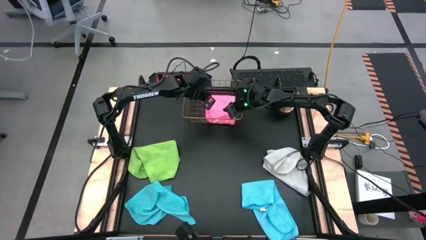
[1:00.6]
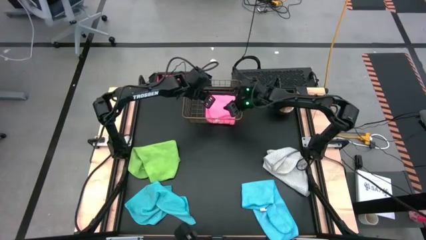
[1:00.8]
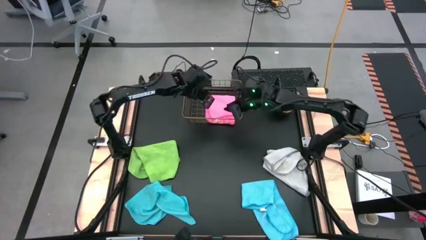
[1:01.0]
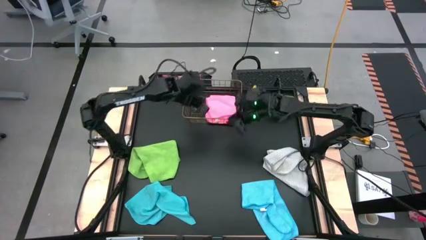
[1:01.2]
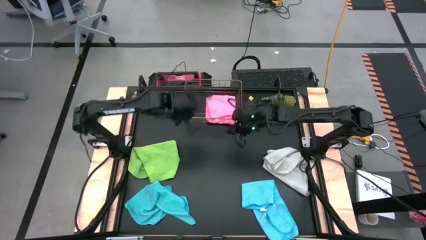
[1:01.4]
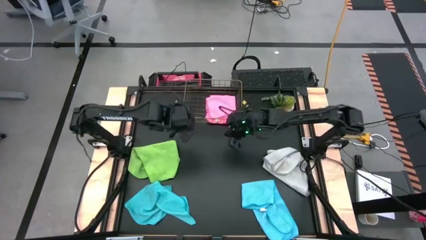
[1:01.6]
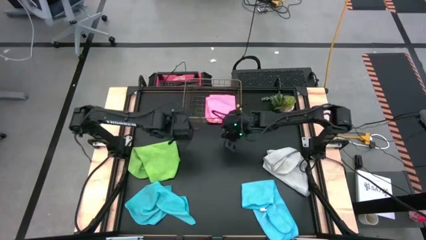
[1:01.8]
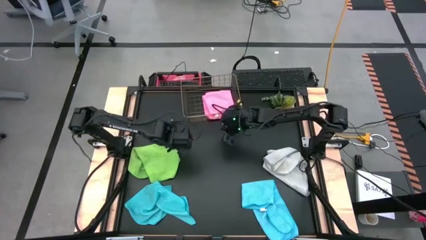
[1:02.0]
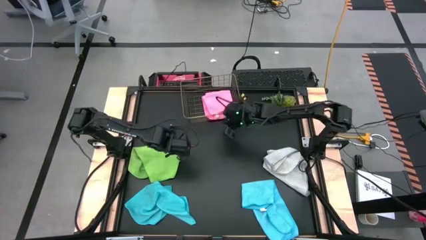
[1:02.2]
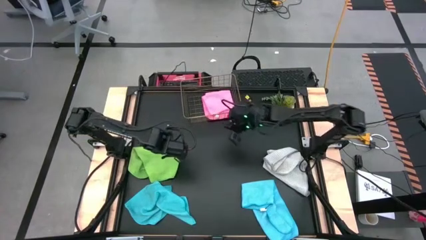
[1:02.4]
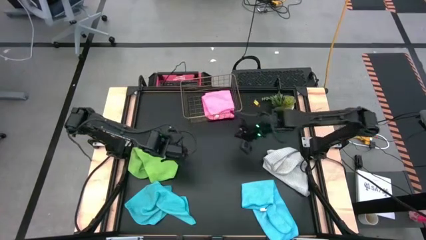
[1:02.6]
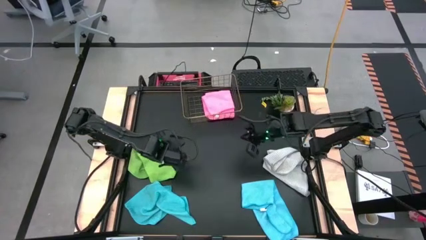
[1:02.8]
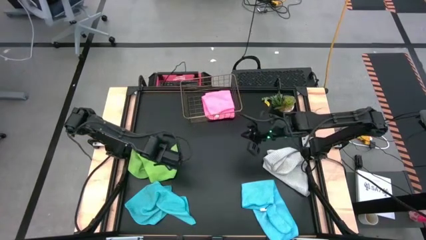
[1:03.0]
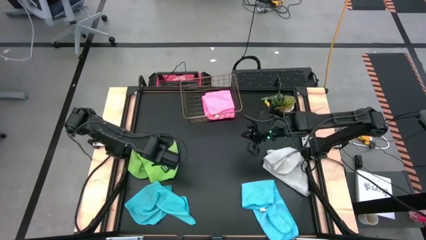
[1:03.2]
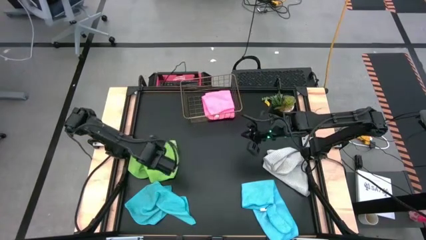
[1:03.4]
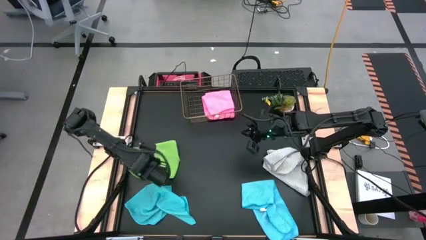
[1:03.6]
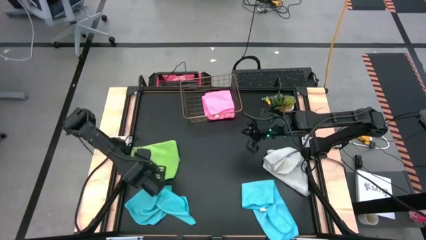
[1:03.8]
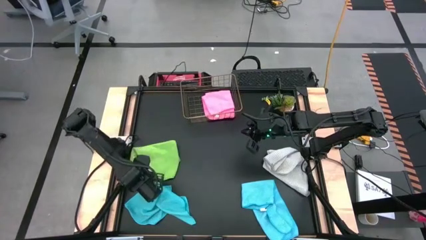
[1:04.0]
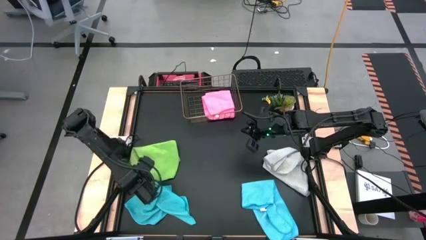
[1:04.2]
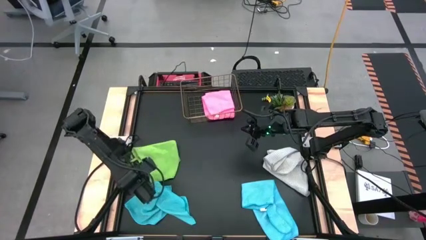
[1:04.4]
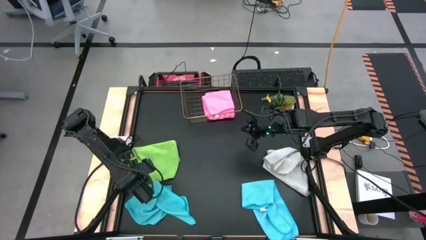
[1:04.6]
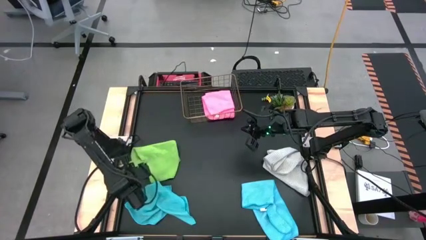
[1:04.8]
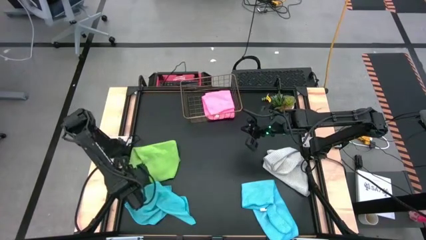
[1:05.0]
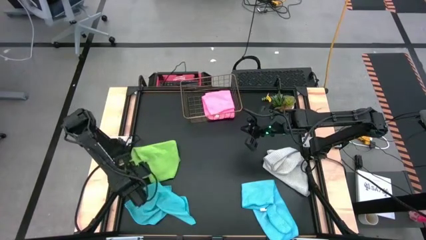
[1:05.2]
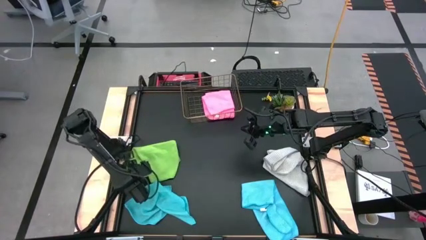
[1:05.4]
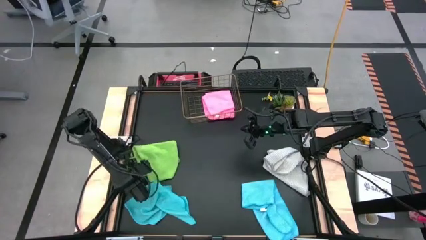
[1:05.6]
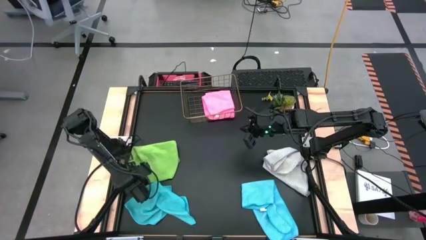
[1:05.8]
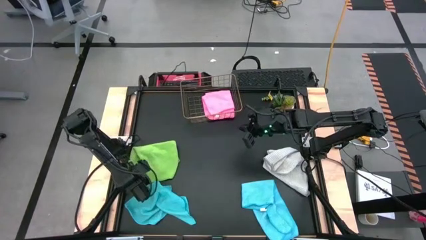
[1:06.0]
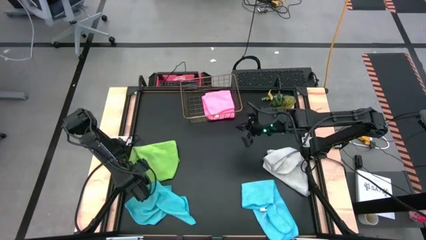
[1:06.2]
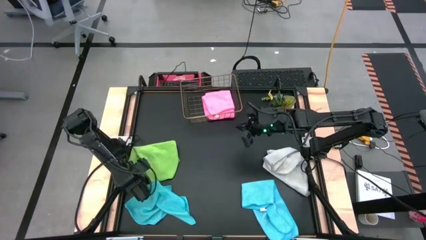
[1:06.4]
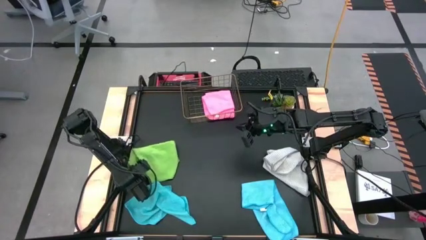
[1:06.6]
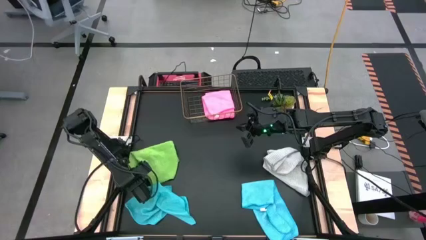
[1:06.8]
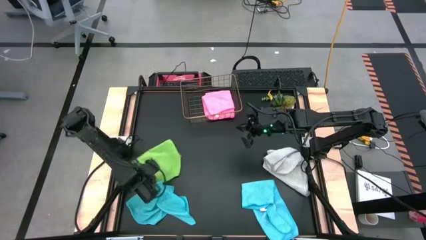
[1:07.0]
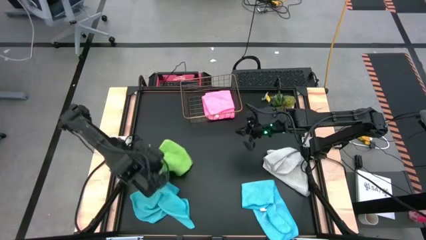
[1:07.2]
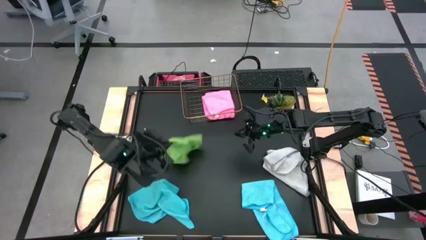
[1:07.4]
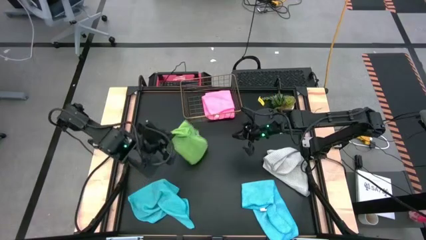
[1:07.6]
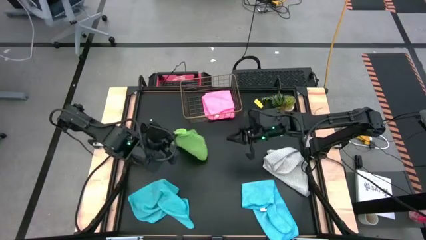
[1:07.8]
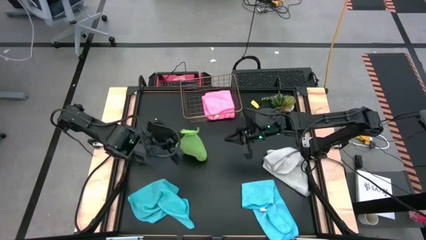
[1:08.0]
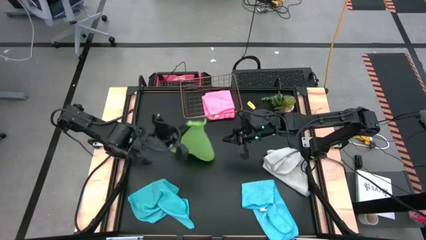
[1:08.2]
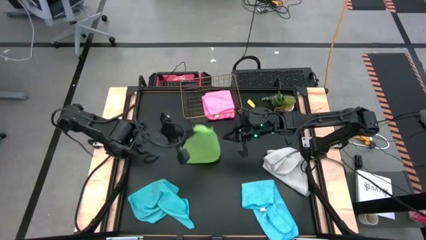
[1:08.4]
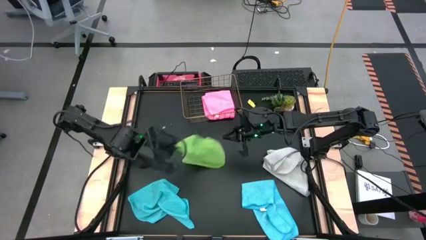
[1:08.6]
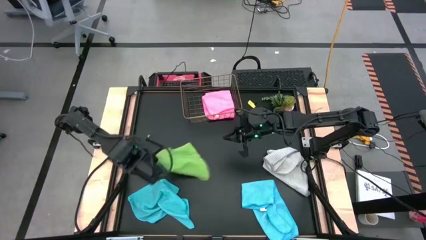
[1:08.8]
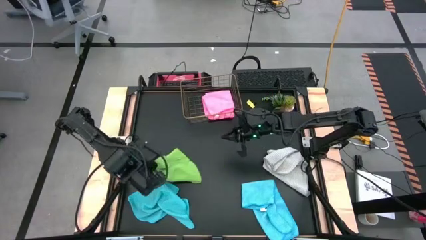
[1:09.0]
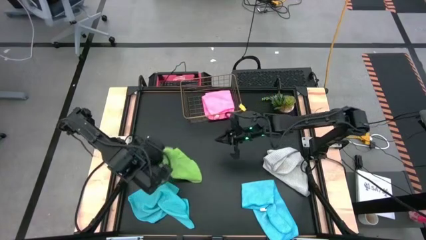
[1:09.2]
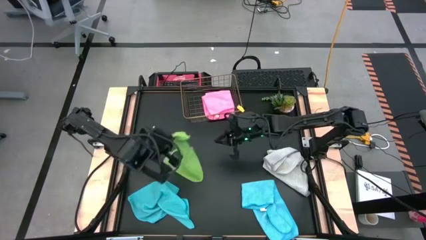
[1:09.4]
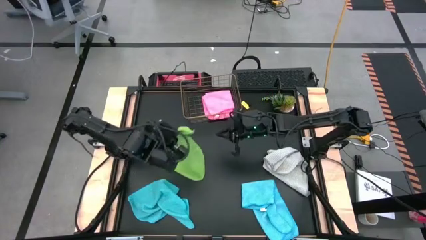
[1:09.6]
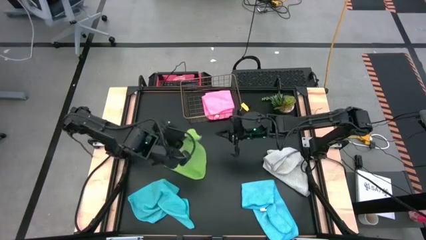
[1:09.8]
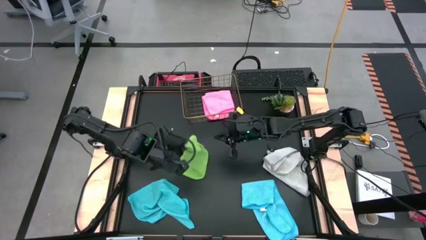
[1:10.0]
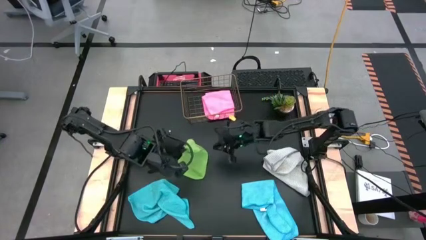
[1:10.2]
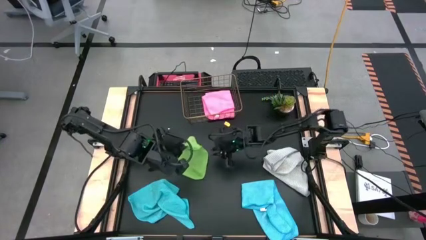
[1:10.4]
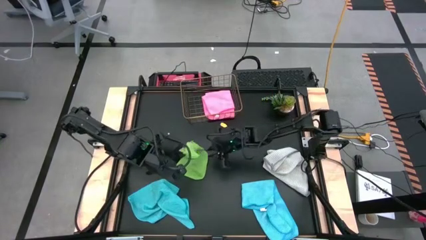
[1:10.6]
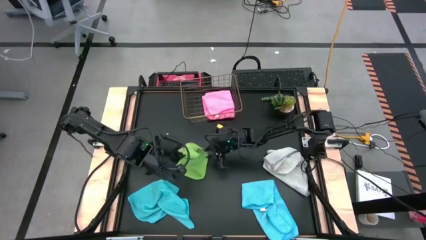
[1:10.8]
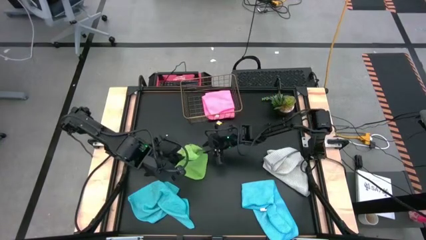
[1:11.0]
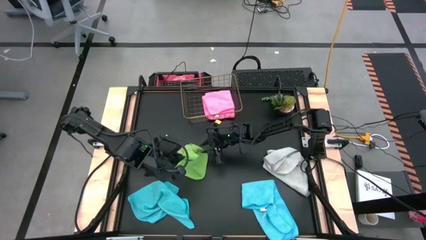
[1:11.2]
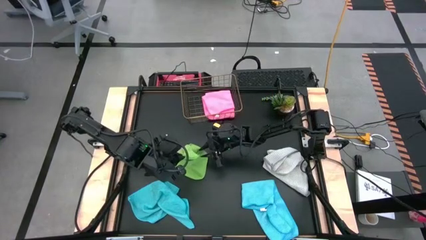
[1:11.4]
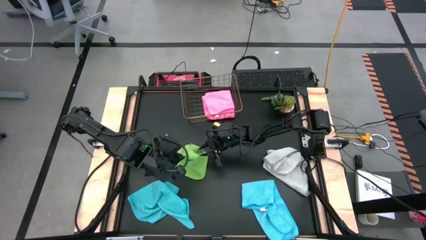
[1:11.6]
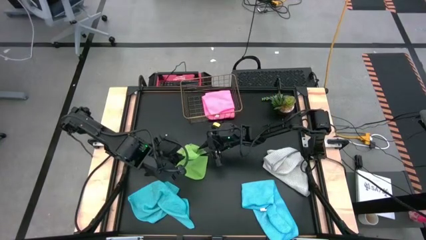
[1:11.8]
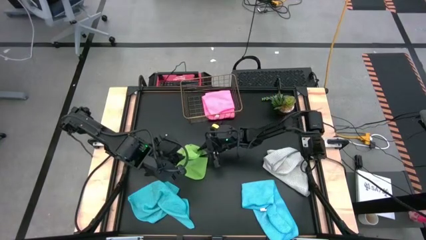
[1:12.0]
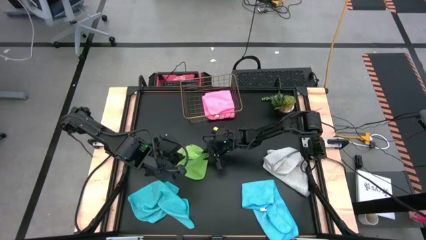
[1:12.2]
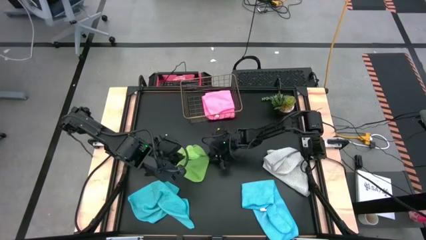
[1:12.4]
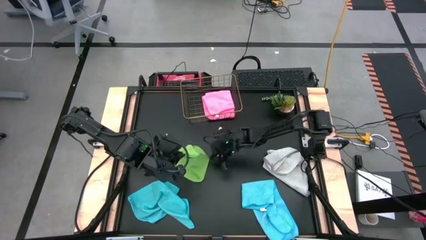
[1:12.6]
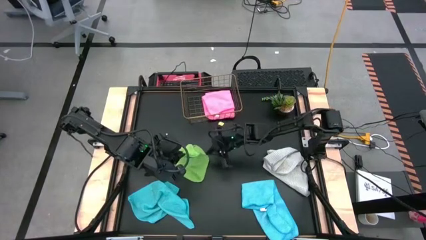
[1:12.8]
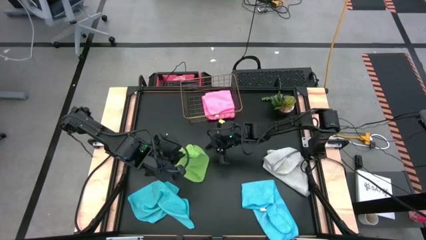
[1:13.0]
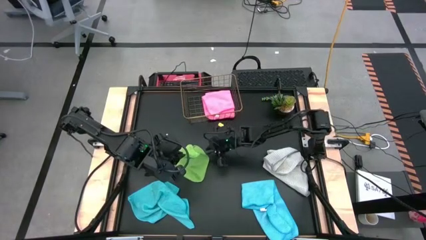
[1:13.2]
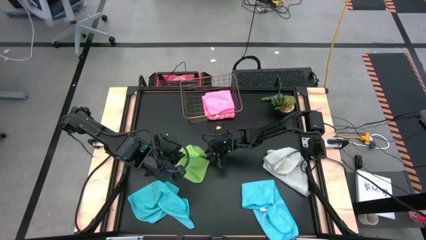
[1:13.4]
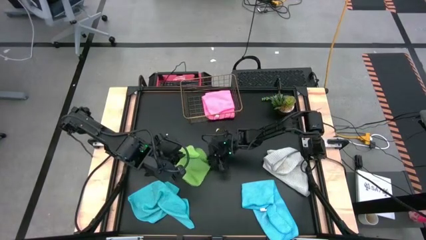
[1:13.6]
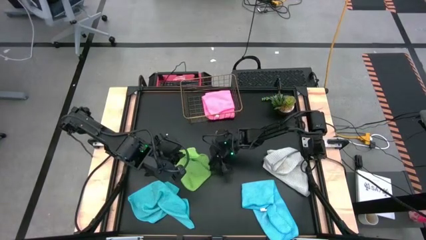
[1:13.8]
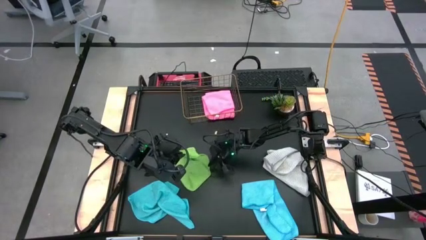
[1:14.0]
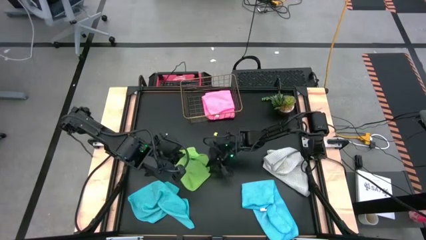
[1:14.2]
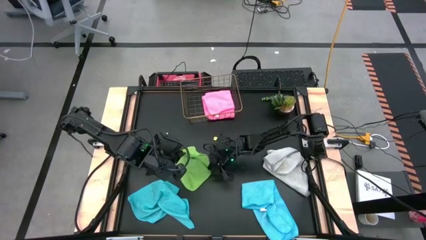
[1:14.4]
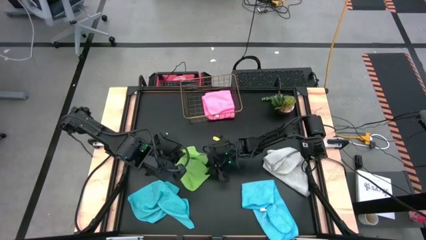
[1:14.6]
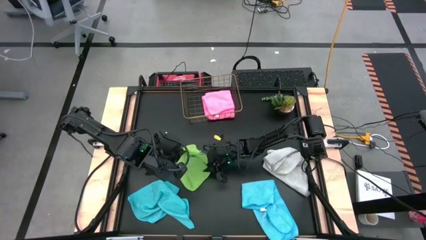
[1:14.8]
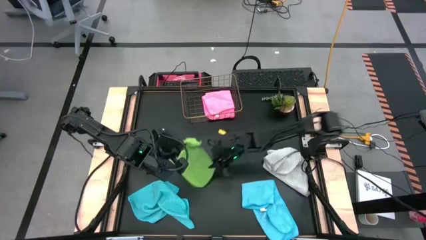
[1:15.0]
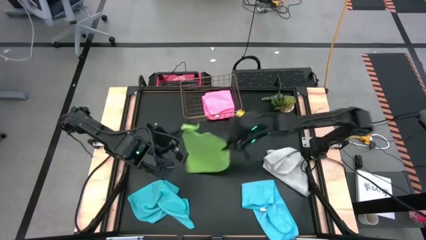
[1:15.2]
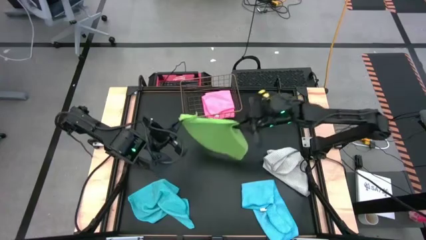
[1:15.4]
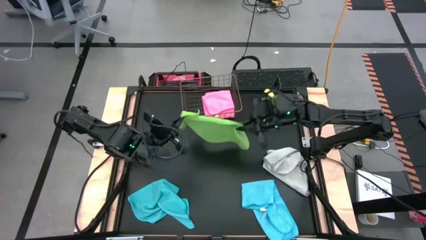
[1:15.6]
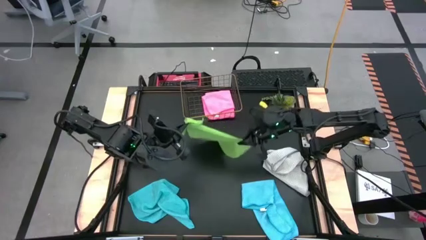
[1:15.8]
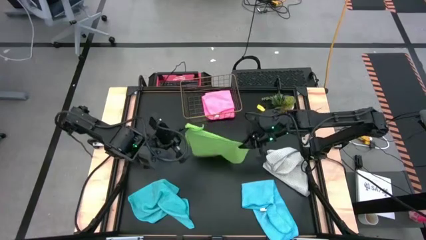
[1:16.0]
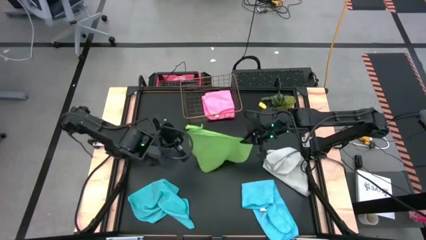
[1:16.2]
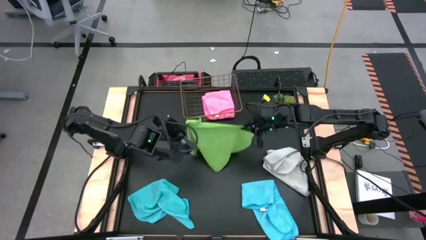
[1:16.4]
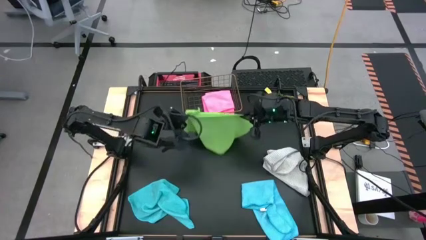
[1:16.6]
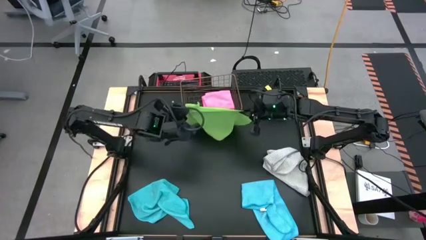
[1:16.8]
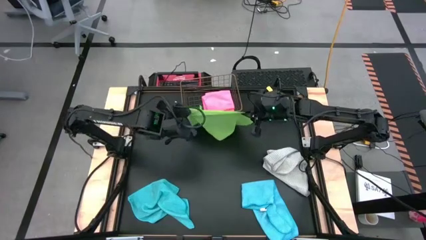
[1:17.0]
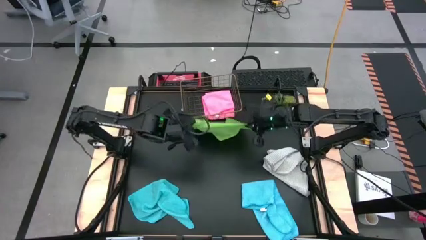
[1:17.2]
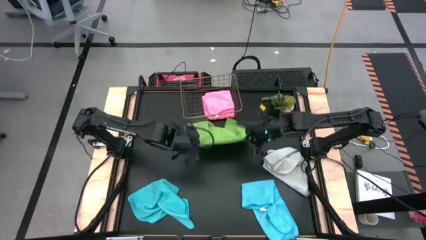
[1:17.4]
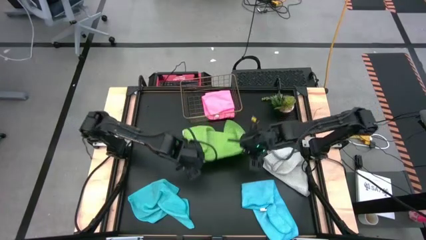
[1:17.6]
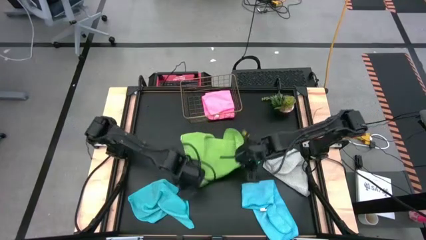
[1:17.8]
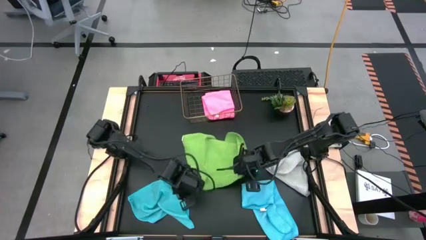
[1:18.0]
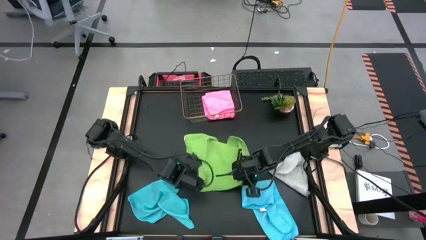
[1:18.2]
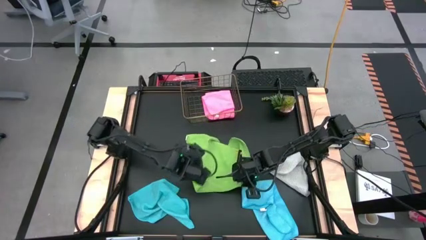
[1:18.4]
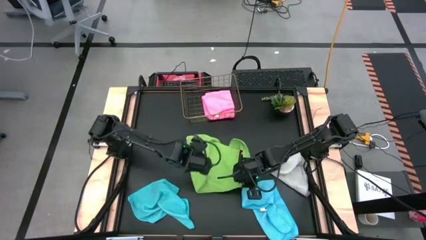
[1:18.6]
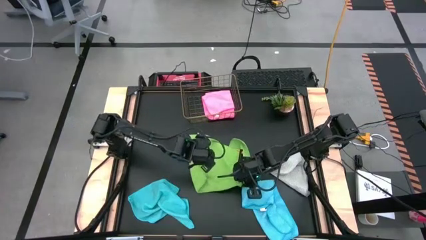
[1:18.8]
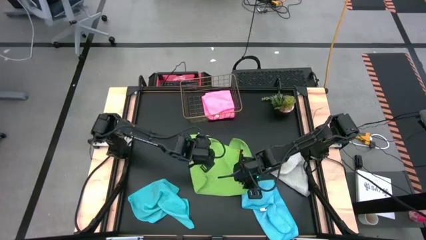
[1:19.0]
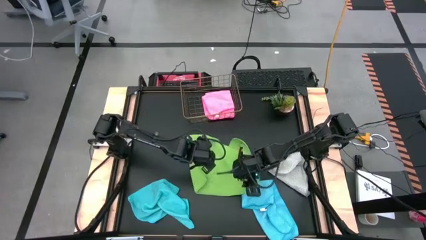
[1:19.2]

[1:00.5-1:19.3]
Task: Fold microfiber towels
Fold the green microfiber cloth in quarters
